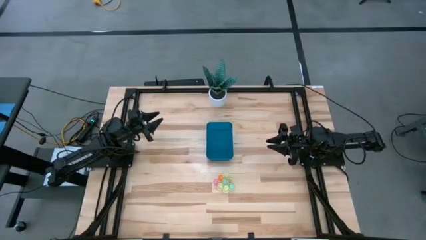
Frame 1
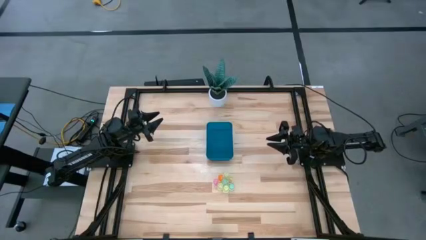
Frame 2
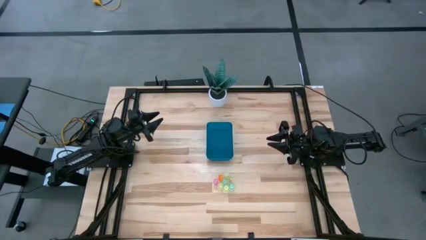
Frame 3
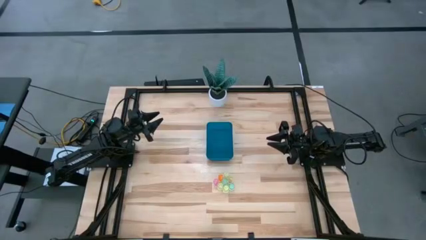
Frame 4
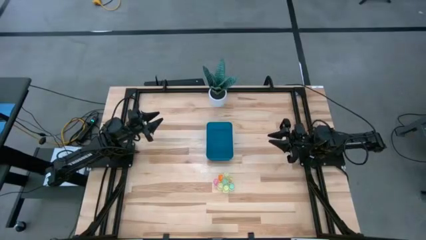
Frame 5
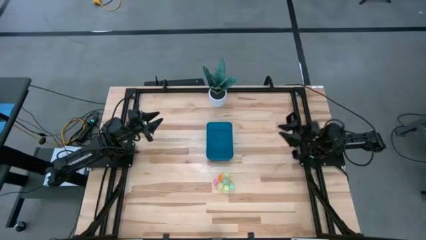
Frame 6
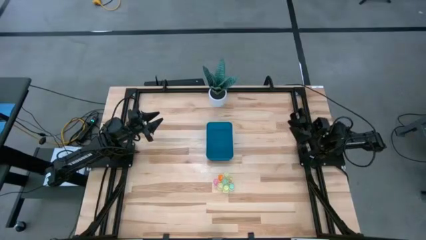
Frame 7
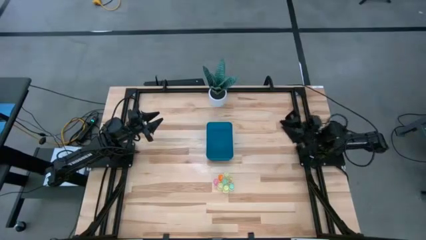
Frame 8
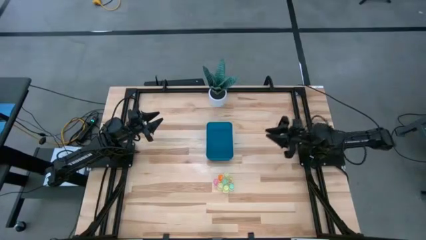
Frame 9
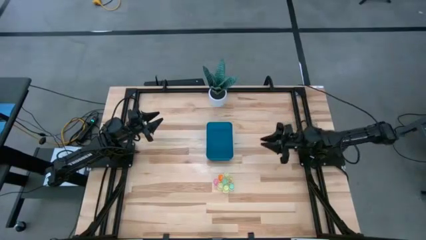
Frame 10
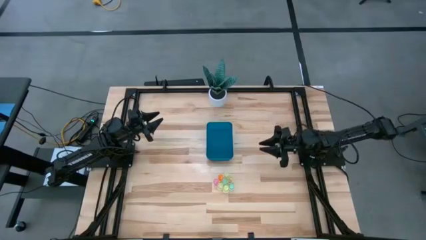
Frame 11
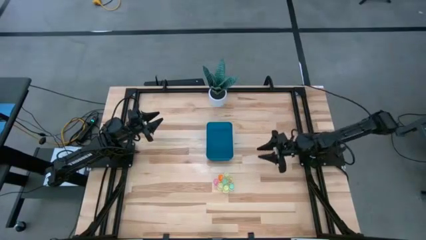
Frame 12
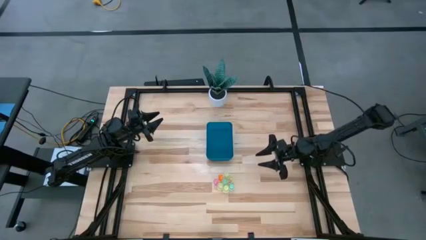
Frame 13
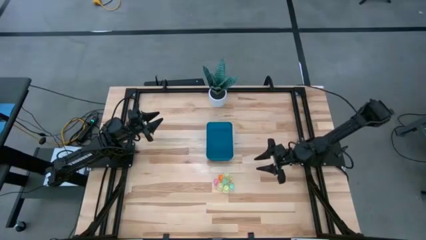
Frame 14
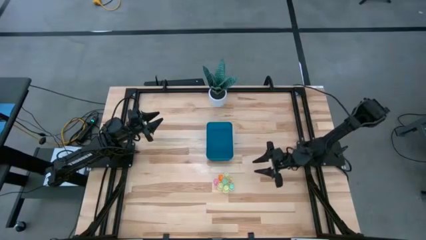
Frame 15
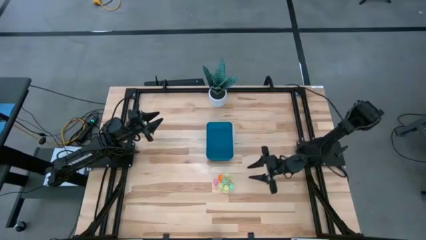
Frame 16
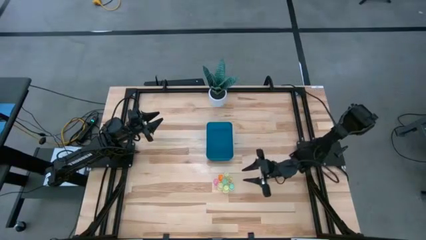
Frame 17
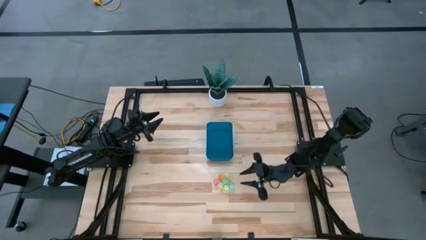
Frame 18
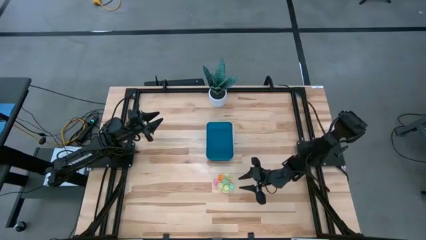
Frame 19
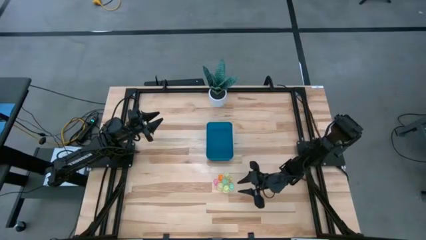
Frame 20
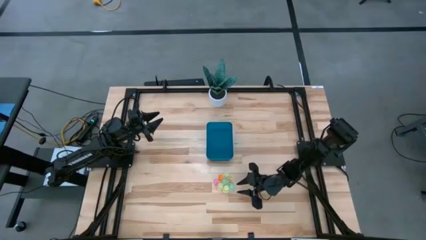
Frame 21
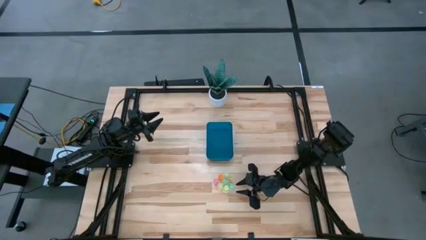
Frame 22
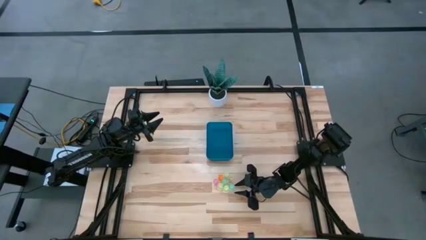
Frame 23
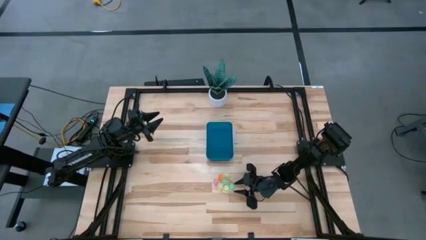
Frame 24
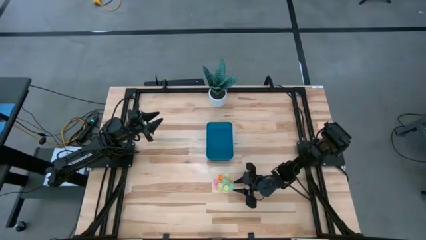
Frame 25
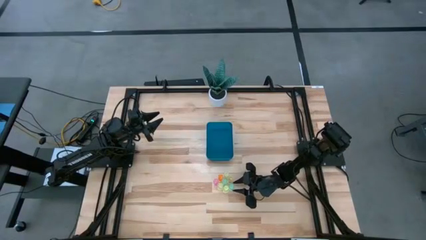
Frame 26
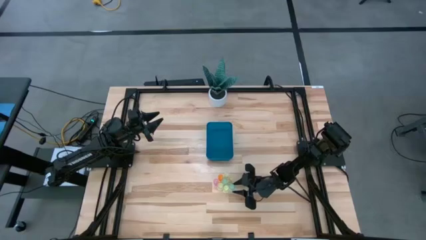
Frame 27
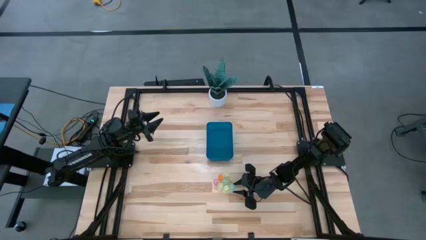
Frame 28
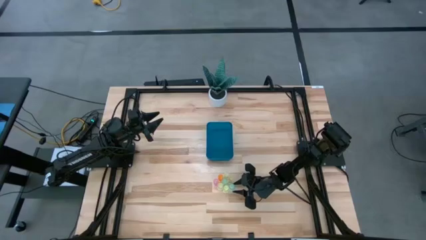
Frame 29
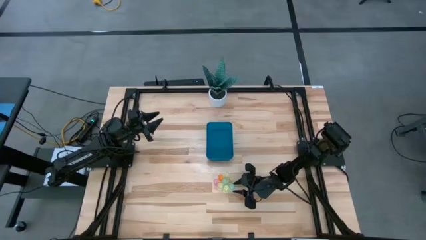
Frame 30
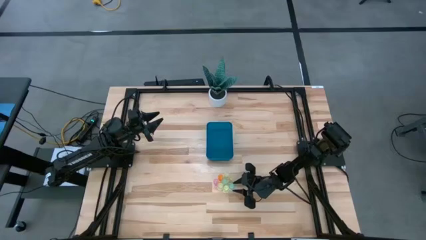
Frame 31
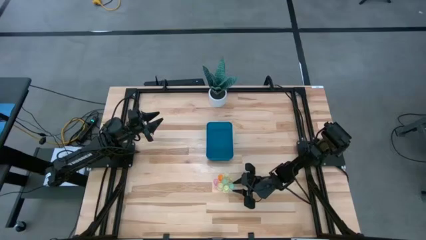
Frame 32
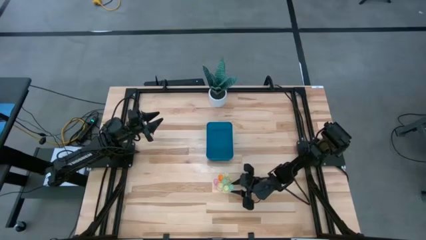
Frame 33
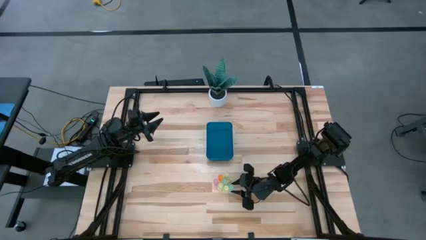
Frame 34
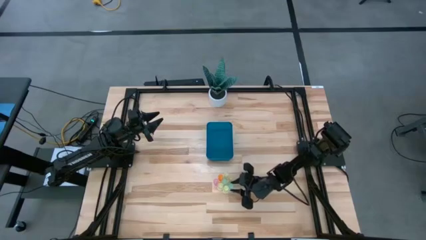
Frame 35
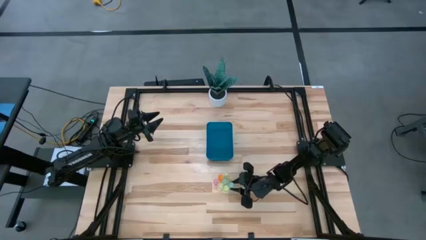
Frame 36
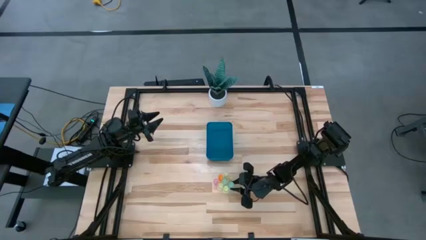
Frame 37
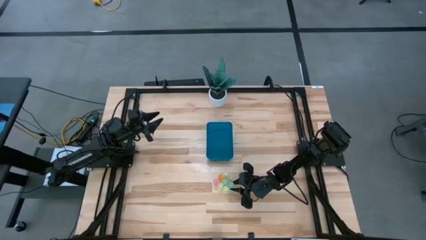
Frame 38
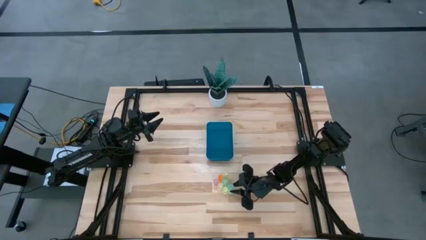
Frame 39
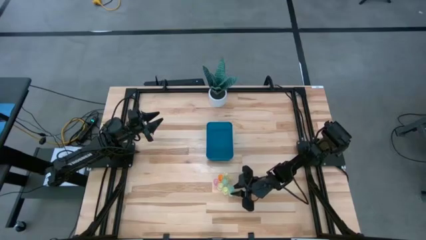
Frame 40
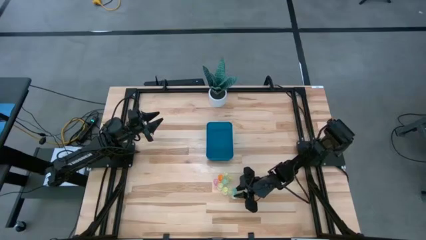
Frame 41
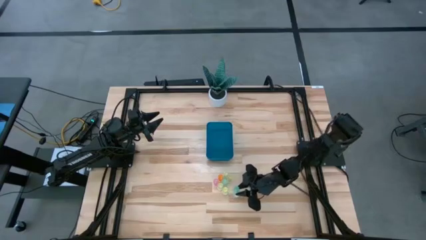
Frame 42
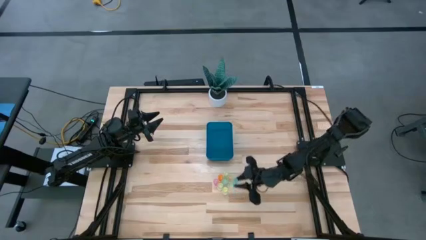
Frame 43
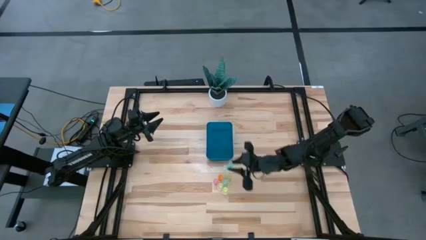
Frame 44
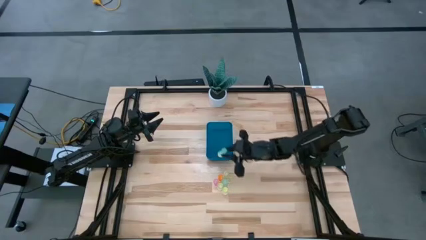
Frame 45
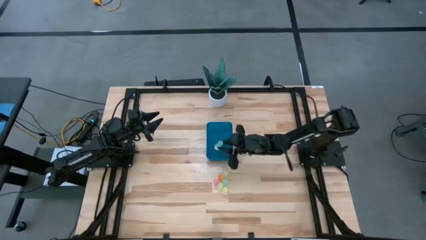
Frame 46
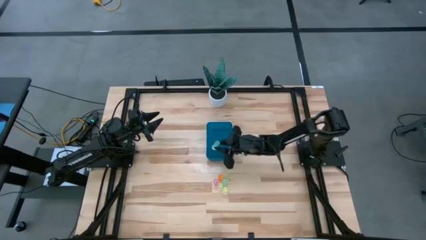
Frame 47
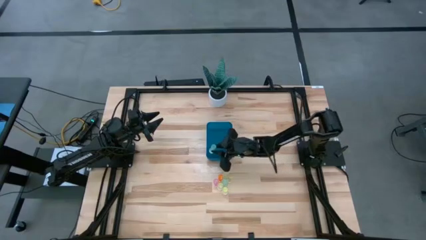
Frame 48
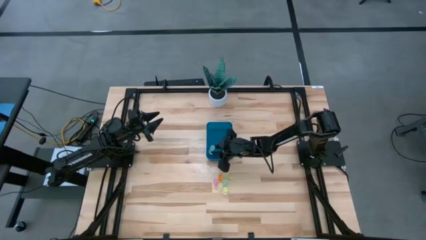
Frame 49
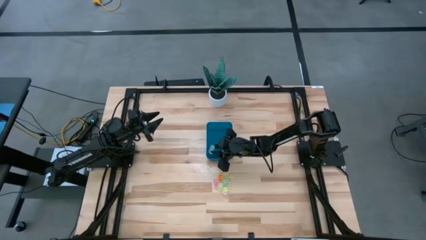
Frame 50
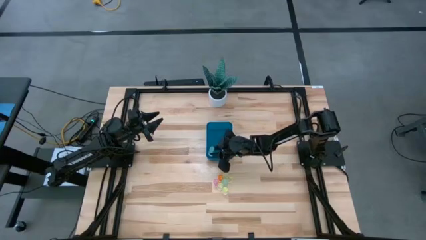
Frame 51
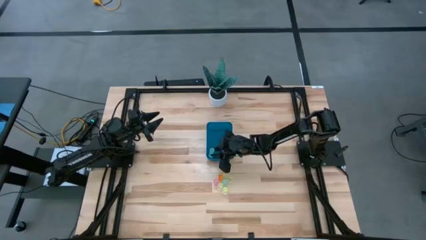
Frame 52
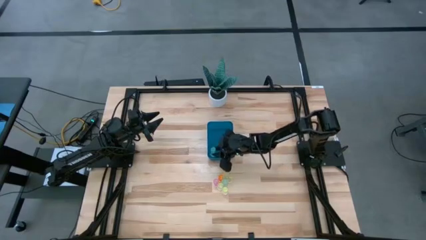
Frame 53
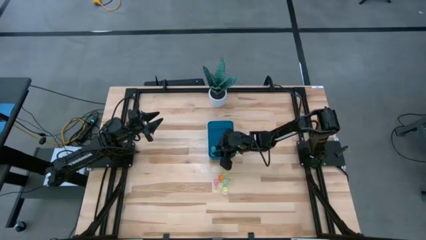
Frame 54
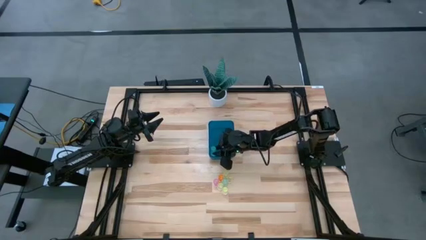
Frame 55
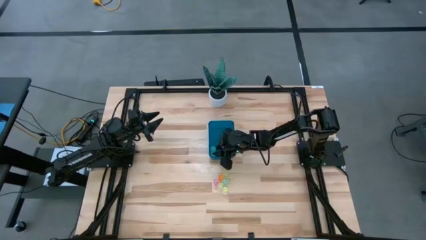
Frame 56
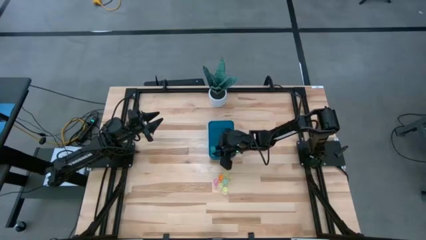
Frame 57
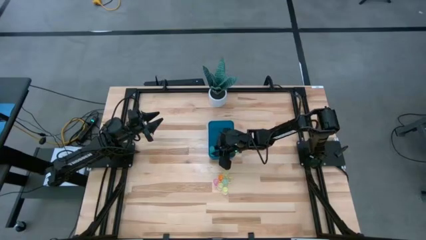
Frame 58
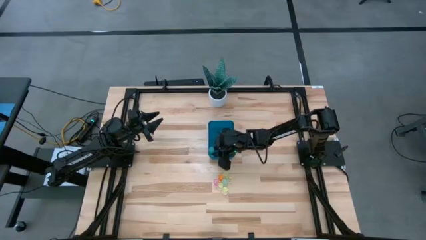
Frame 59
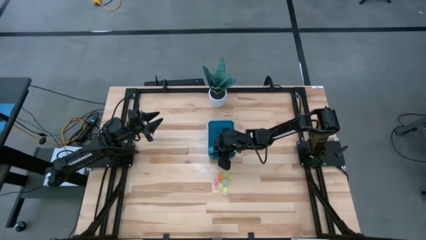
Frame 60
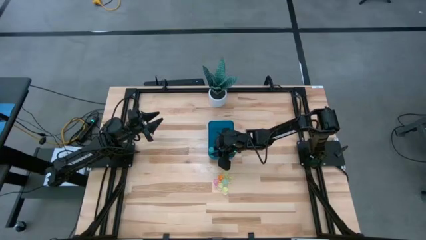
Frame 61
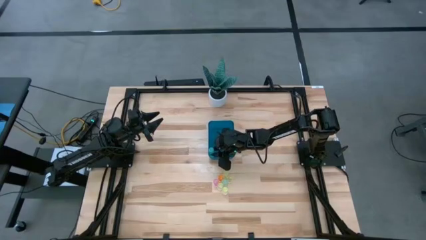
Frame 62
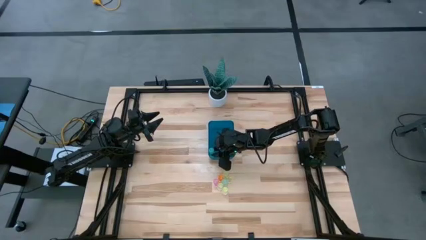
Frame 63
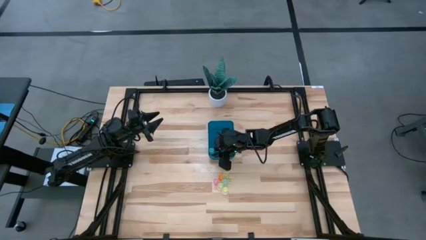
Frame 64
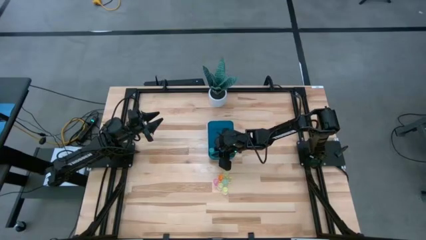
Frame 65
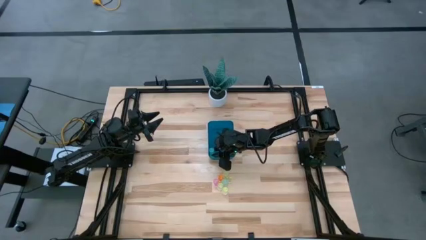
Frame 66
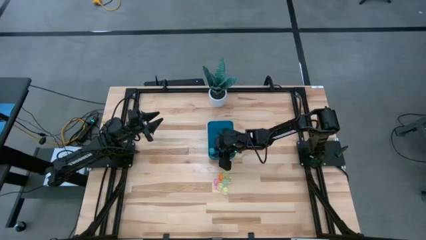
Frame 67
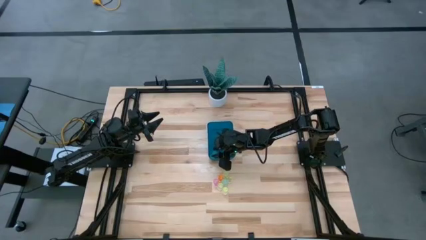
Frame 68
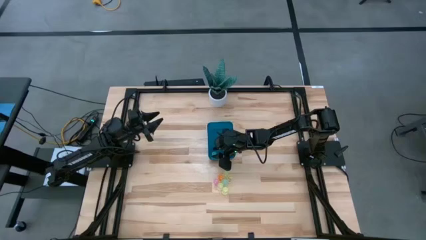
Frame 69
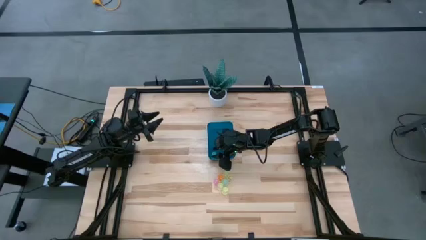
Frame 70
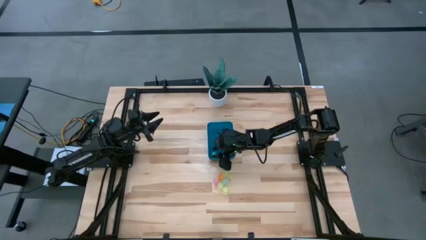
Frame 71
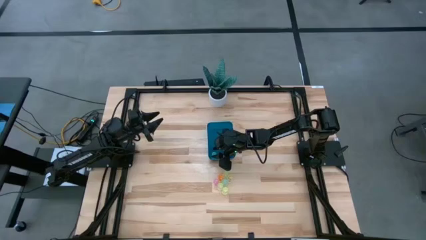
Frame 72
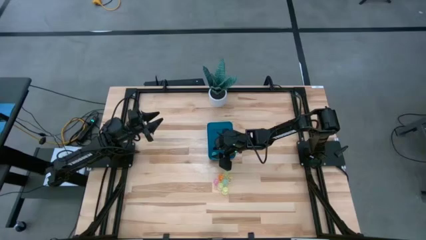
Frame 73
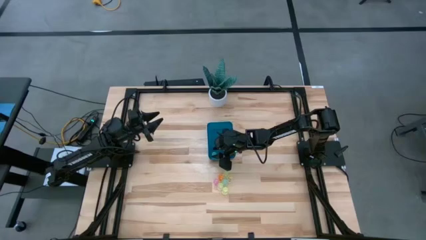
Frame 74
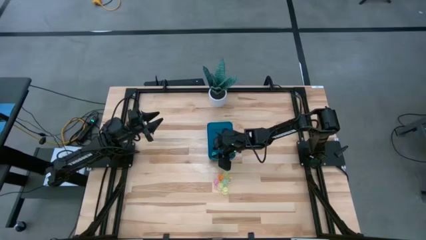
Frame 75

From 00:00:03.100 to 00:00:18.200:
Task: Pick and place pill bottles into a basket
Put the blue pill bottle into the blue container
